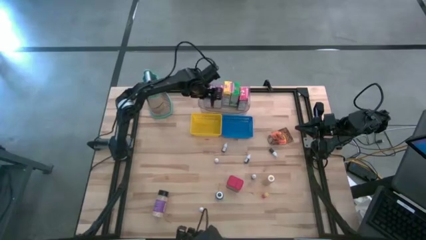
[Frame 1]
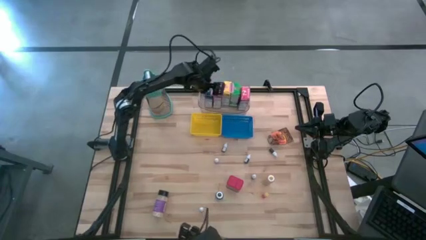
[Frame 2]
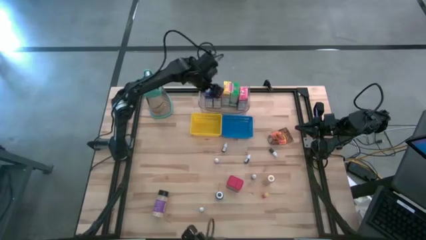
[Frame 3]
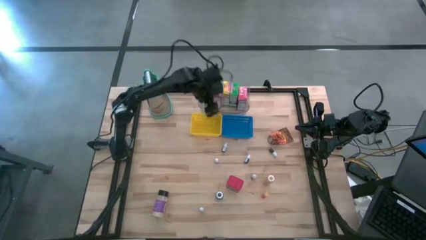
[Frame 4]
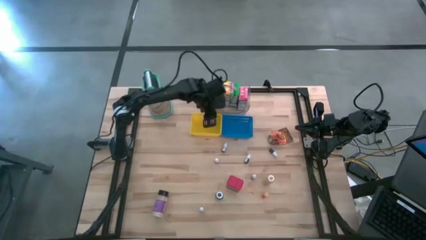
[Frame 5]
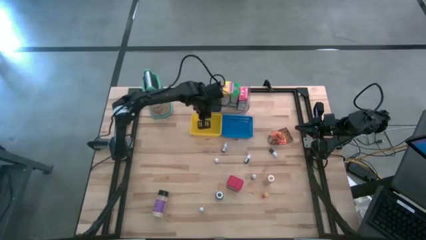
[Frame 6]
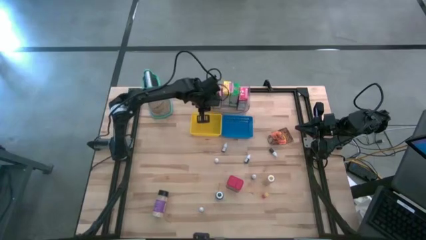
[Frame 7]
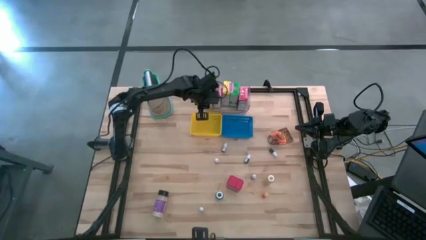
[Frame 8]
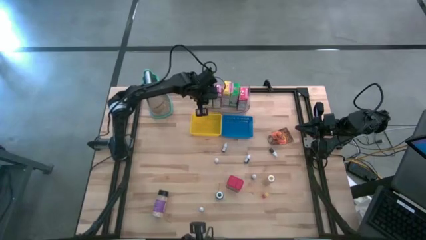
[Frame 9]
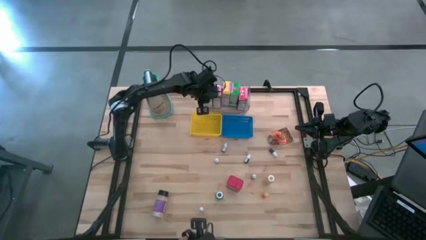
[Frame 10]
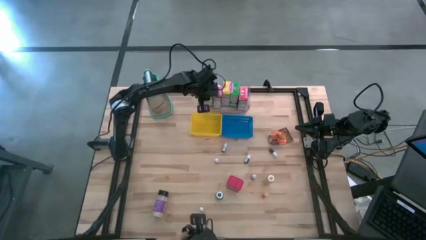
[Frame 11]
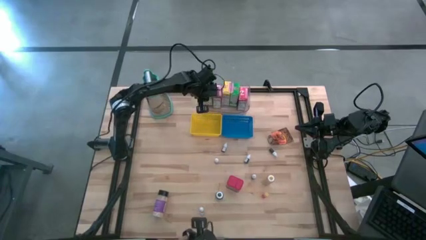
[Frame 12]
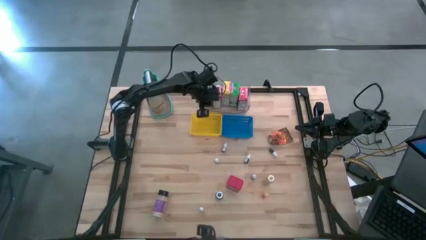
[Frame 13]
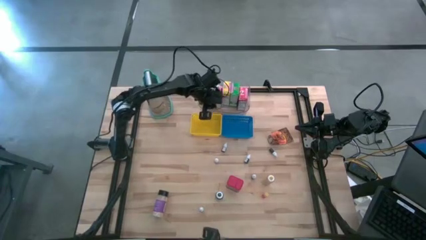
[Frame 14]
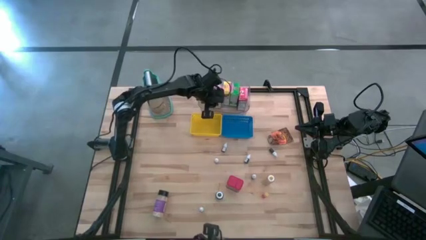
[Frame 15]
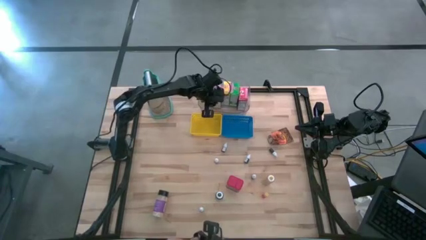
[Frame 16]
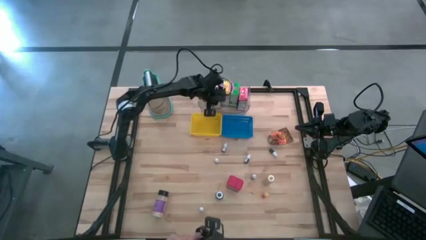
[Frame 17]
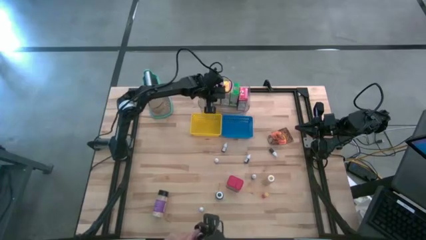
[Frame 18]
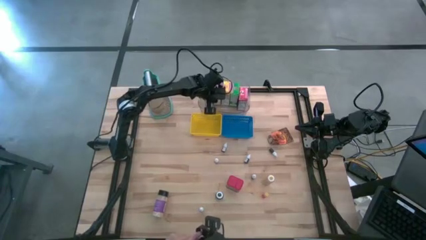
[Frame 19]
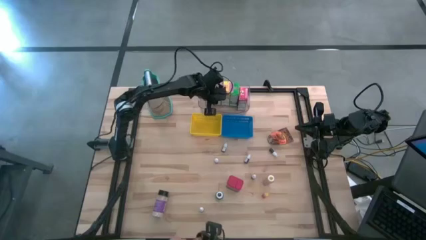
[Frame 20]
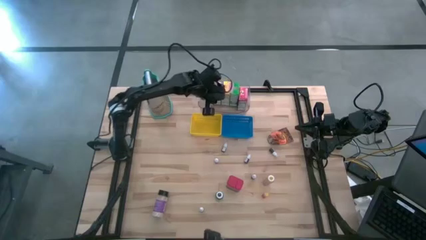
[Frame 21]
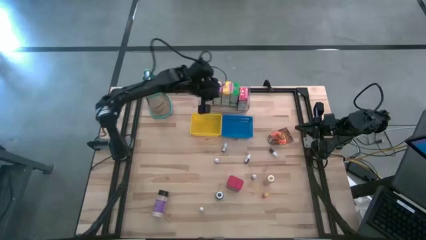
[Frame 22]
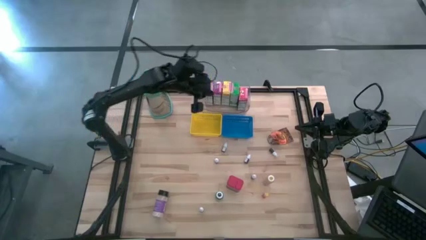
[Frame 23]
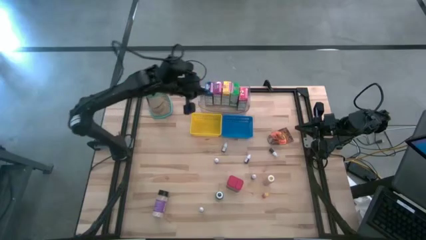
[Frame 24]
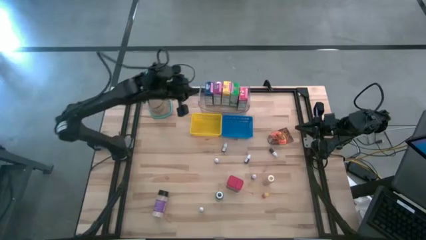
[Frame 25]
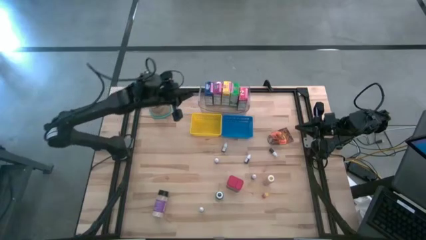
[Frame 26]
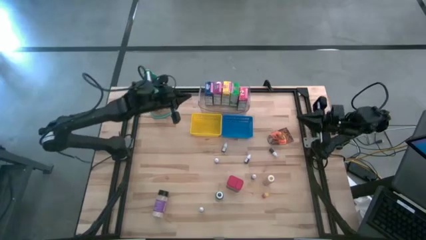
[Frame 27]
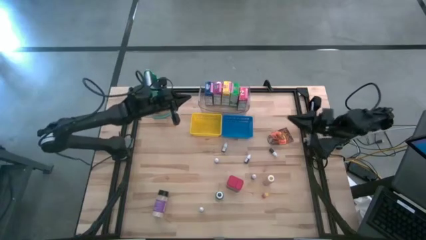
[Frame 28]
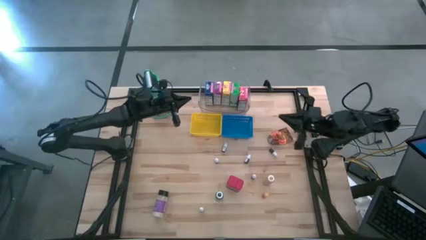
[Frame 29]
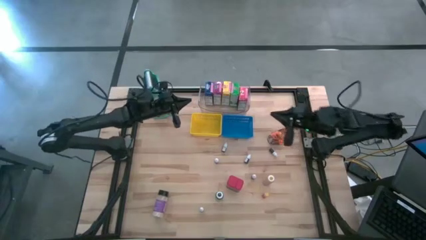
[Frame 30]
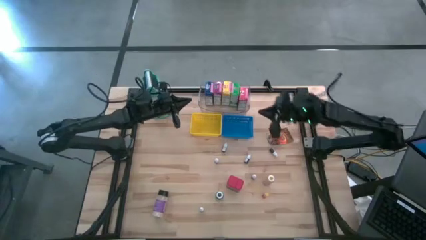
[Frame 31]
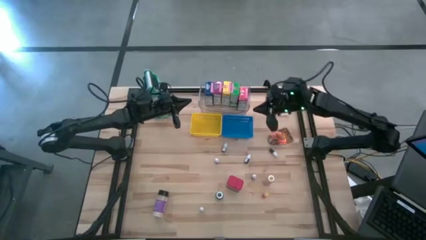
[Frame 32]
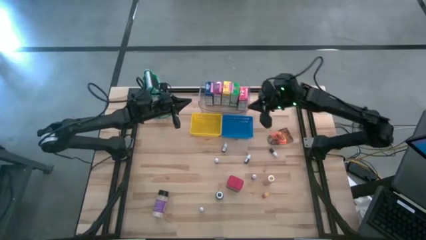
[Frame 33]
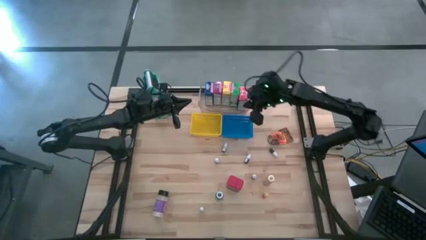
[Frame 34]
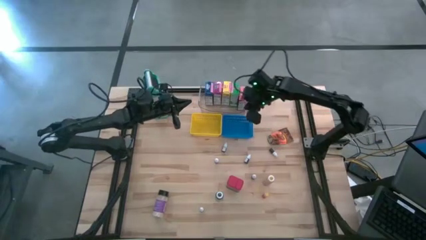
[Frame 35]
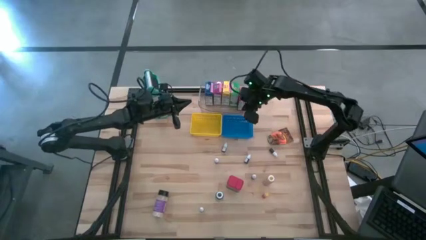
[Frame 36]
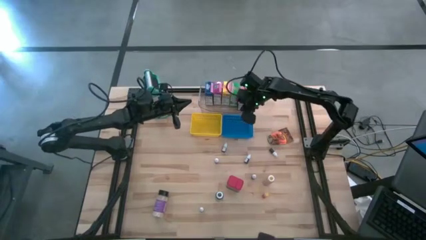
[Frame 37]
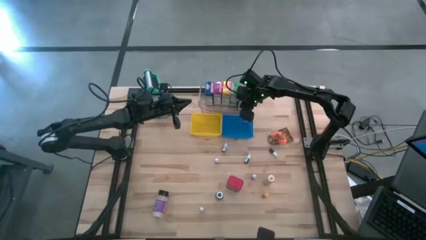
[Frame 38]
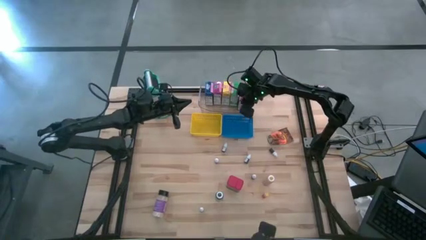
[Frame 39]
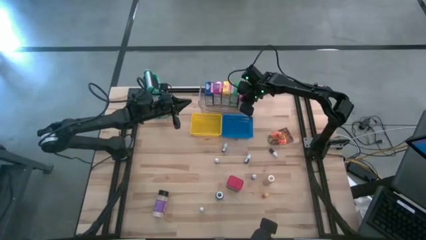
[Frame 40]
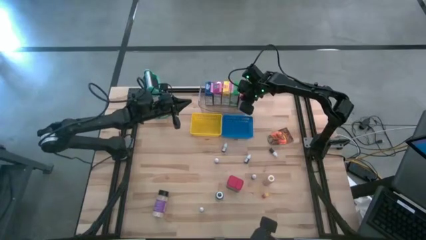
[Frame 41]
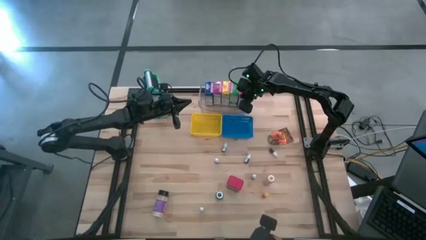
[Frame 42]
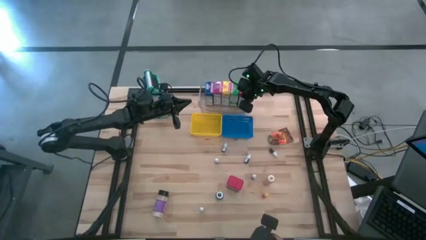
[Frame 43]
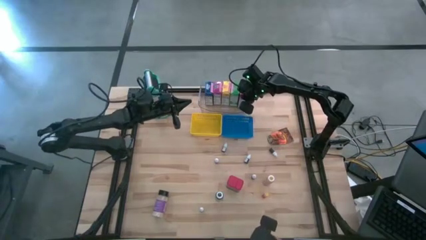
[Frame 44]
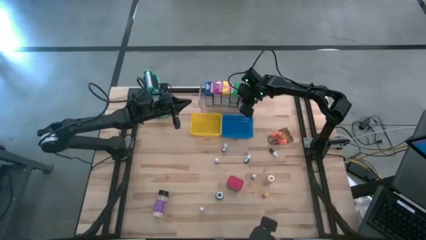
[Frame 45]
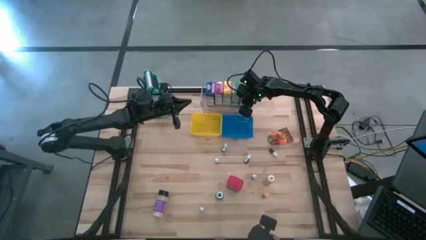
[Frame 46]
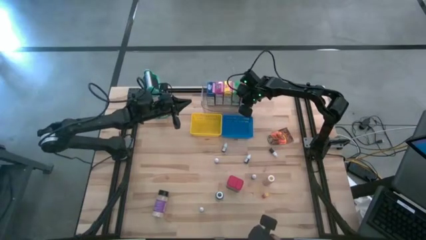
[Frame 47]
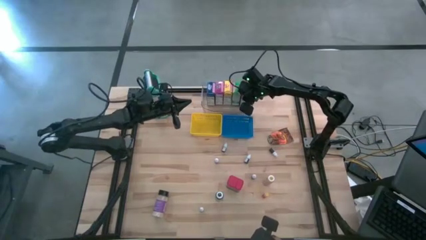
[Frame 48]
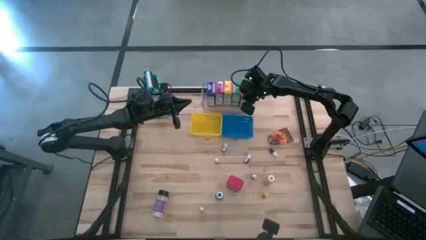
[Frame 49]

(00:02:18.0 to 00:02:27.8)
Task: Pick & Place Kitchen Items
Adjust the cereal boxes in the transparent bin

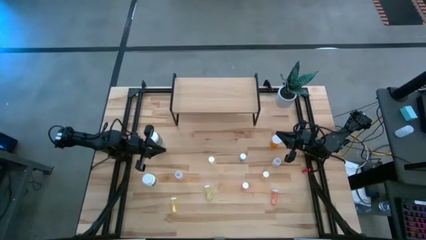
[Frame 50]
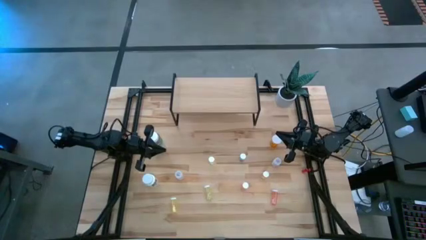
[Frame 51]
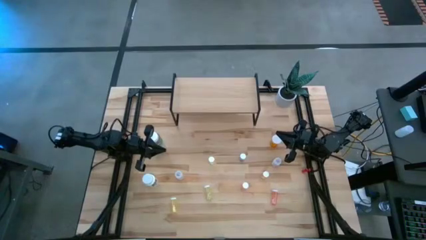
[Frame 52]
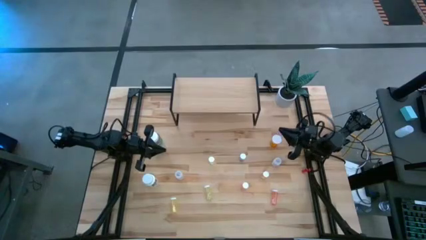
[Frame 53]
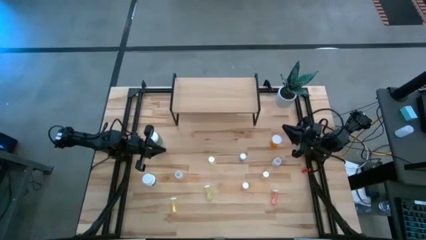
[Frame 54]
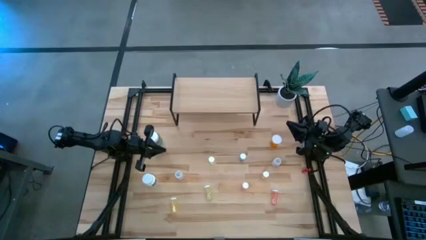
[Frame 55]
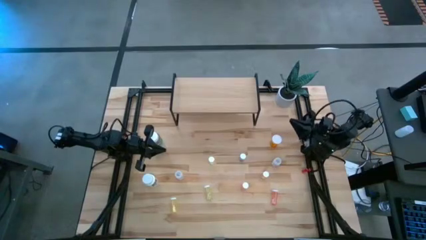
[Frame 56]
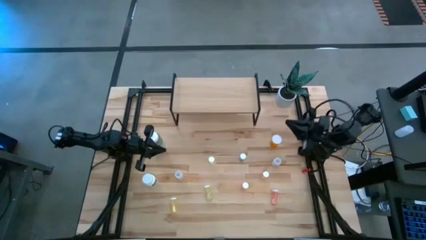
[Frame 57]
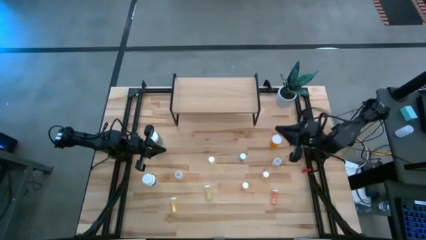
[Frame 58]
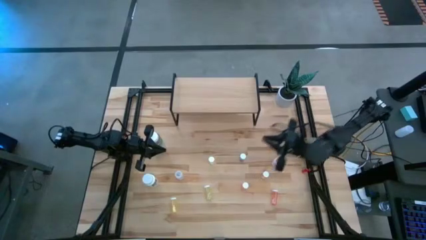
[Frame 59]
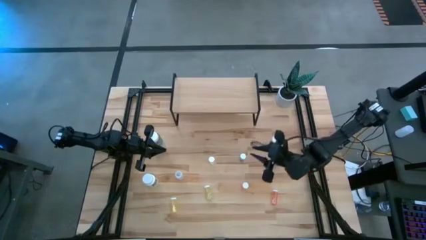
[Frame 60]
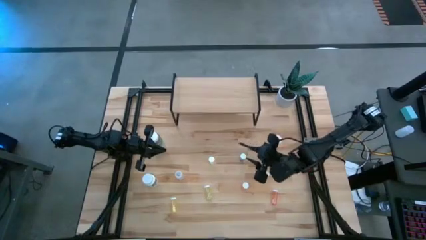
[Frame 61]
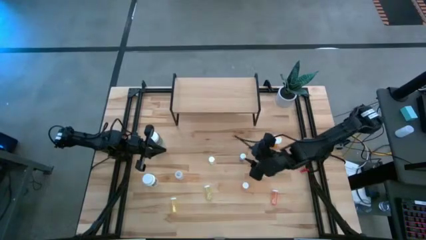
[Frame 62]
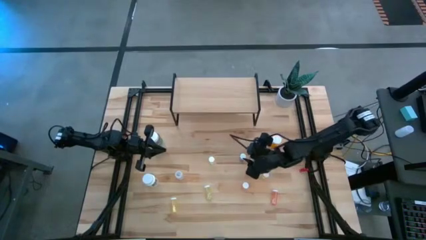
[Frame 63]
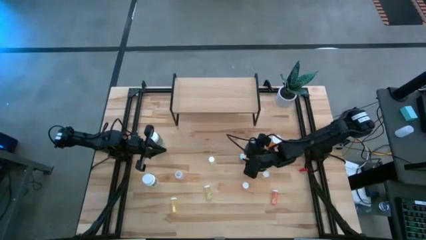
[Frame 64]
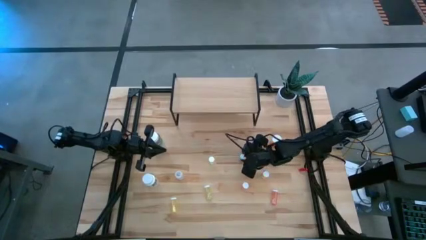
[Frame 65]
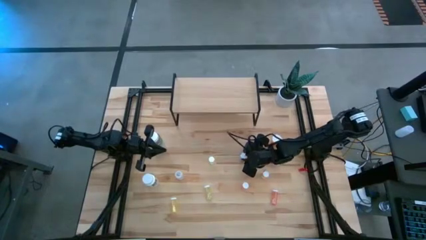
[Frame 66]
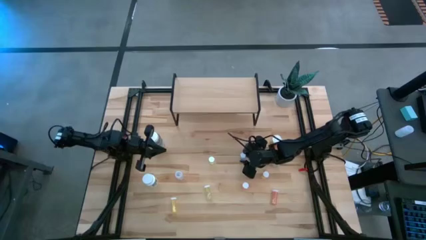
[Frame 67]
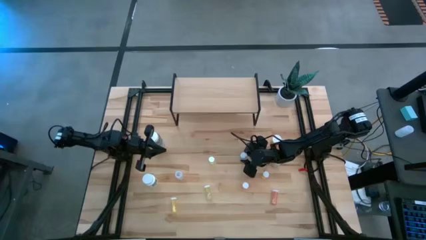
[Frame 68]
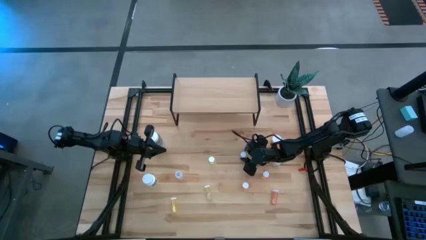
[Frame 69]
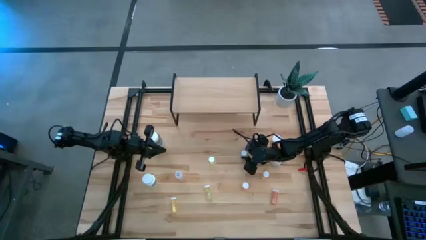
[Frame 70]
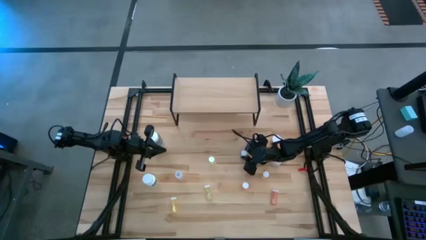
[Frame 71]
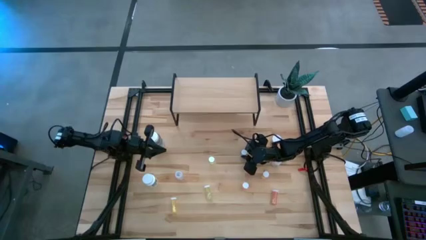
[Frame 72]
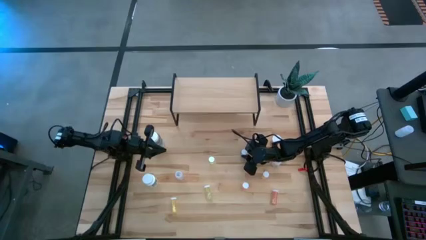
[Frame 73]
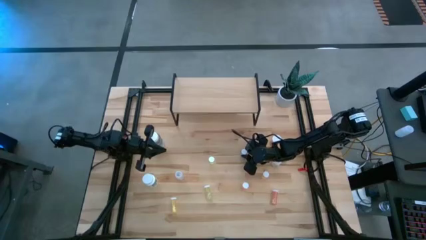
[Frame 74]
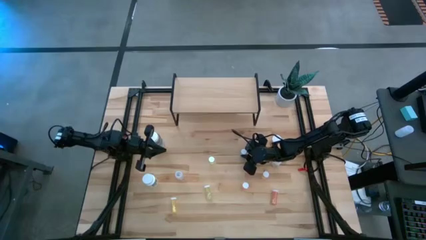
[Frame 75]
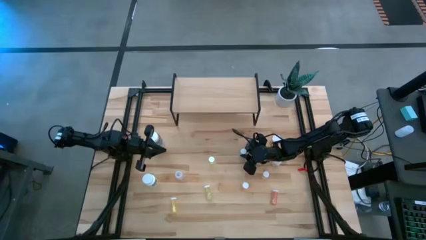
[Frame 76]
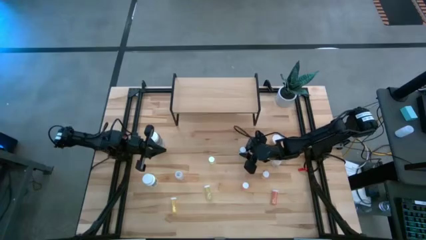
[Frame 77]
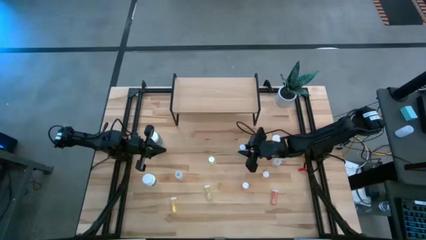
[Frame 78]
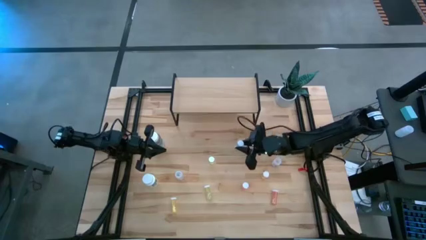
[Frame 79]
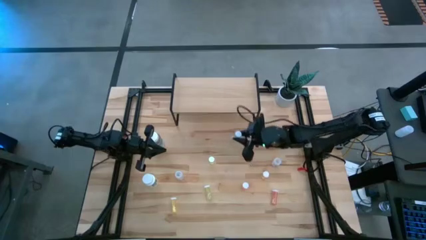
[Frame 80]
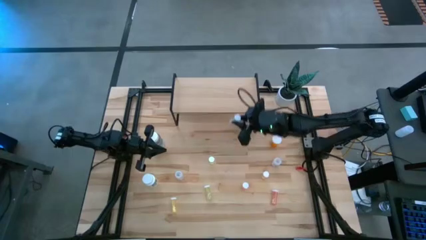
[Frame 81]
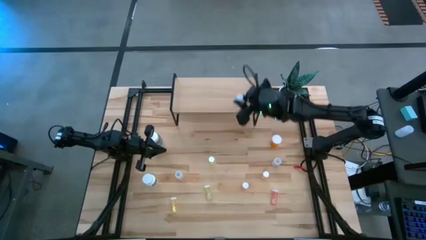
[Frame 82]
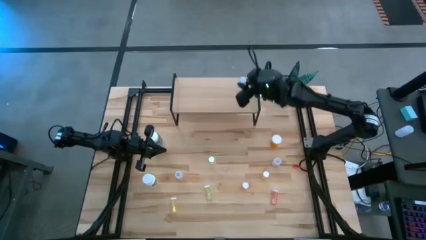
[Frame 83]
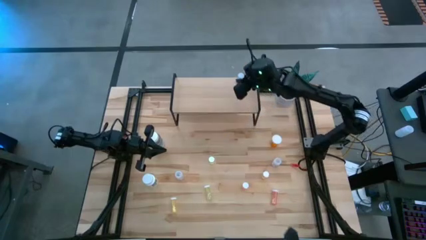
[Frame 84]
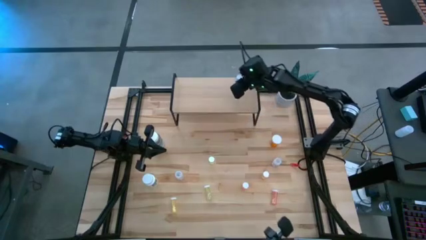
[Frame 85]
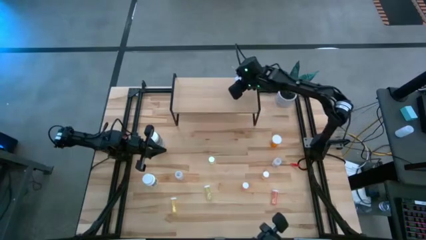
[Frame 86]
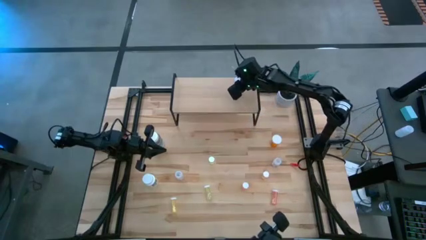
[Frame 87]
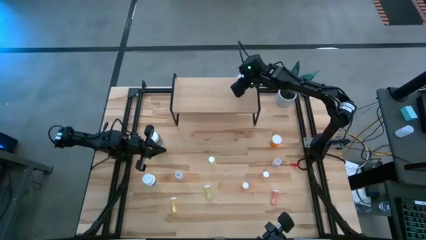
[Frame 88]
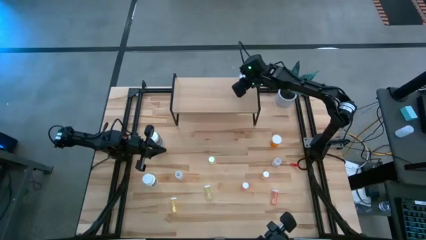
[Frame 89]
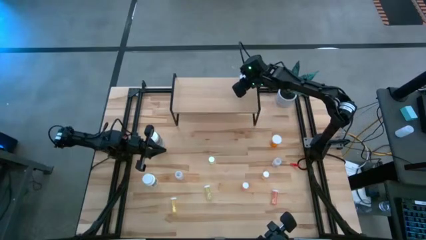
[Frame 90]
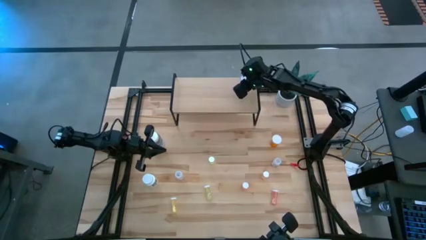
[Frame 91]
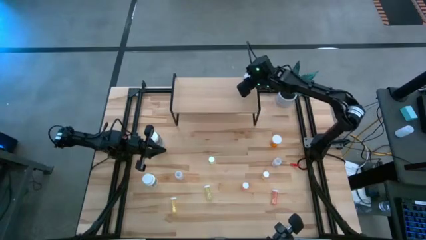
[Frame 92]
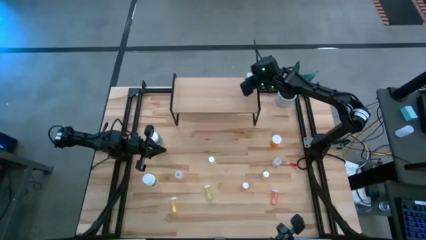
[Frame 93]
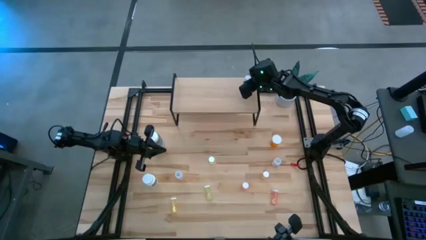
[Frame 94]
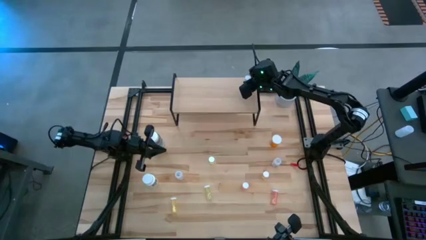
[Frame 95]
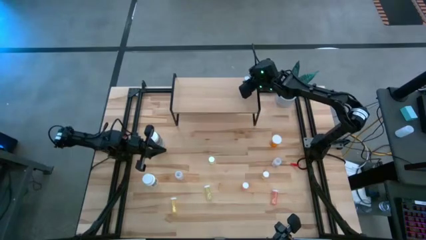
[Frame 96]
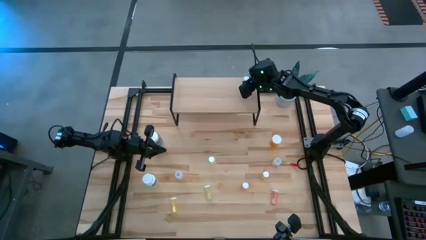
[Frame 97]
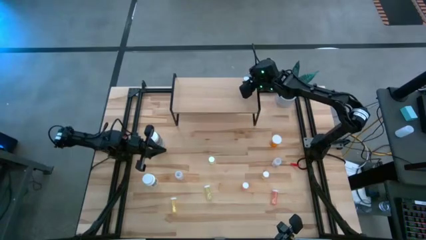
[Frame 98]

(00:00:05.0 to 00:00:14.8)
Task: Pick and place medicine bottles onto shelf by color
Put the blue pill bottle on the shelf
